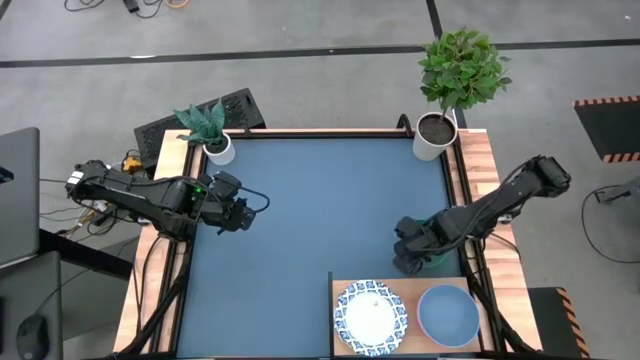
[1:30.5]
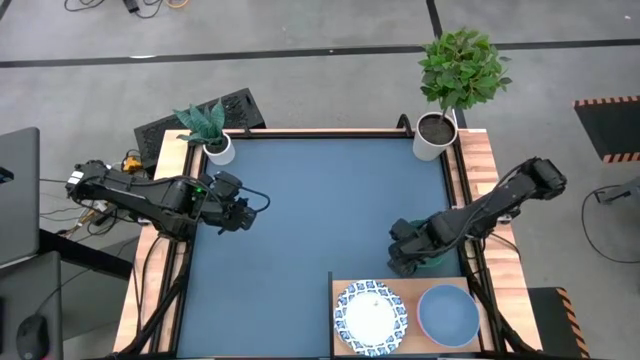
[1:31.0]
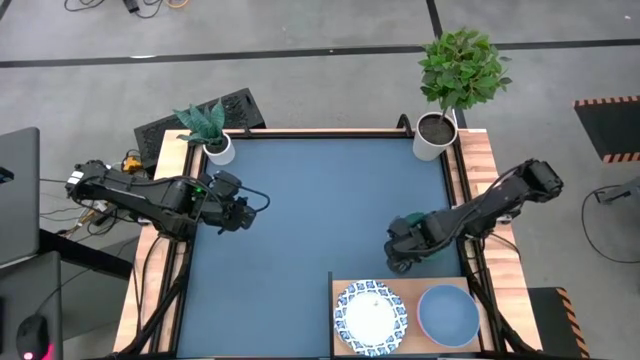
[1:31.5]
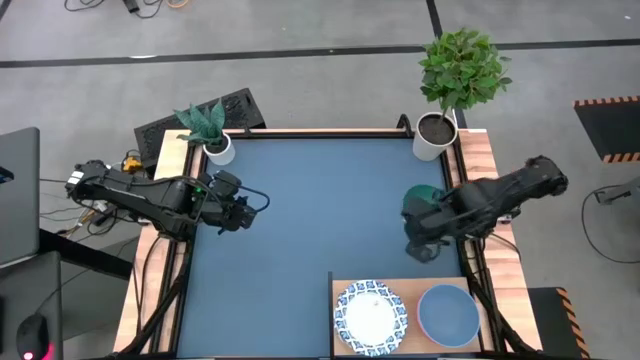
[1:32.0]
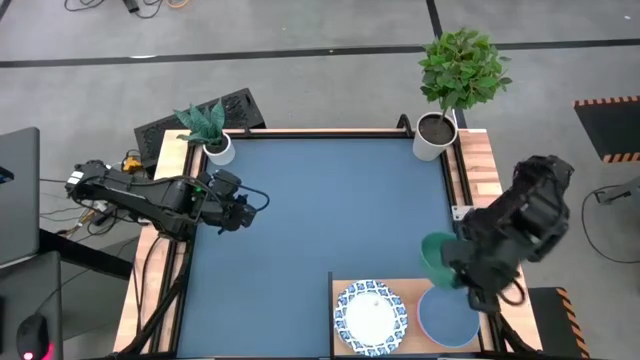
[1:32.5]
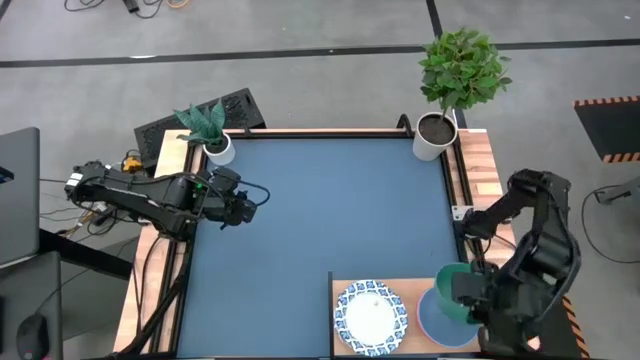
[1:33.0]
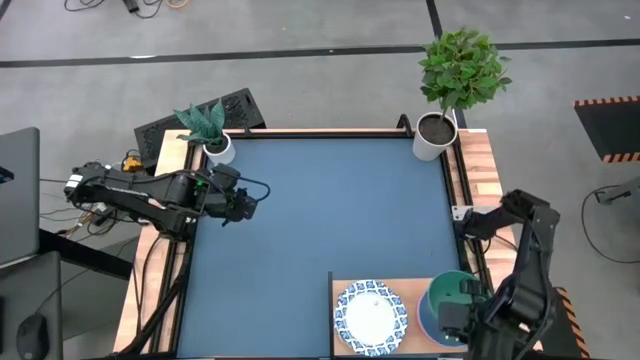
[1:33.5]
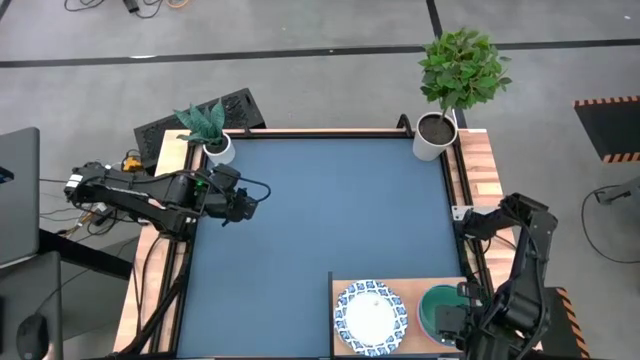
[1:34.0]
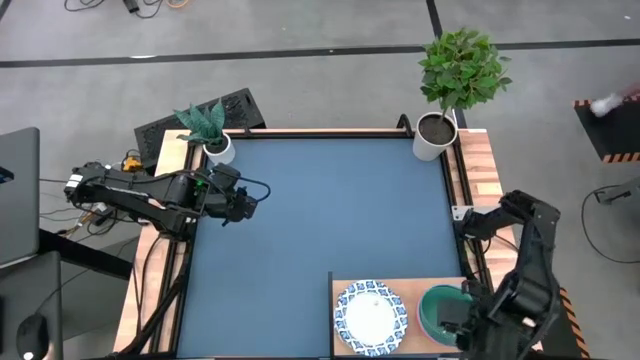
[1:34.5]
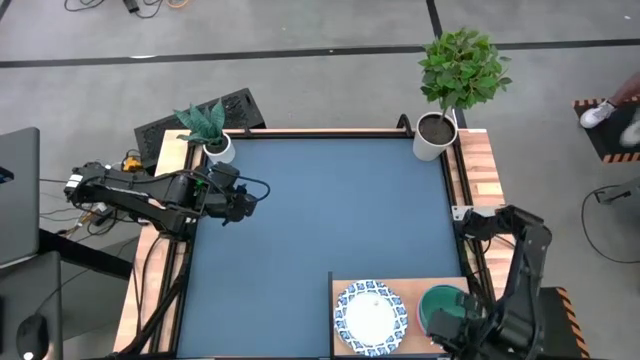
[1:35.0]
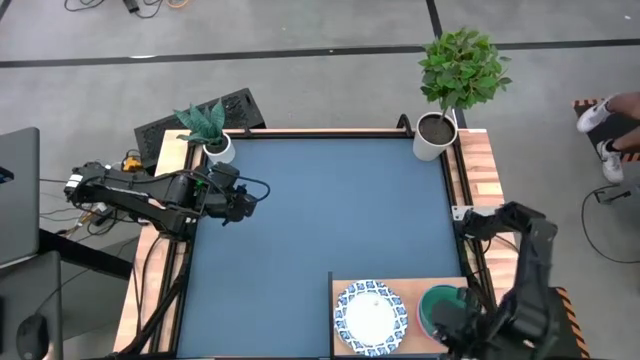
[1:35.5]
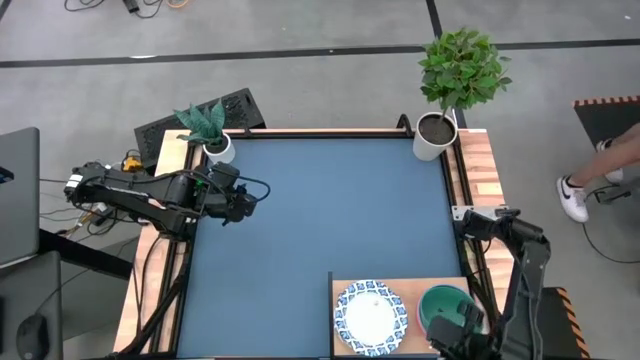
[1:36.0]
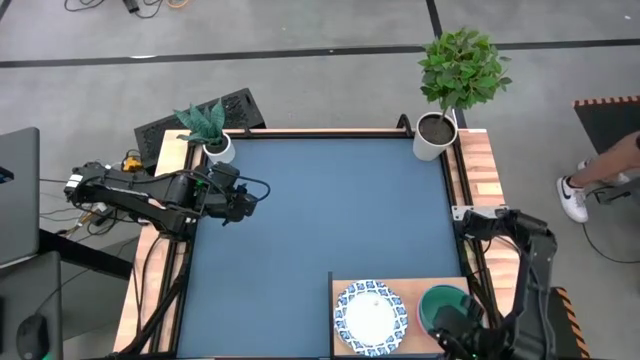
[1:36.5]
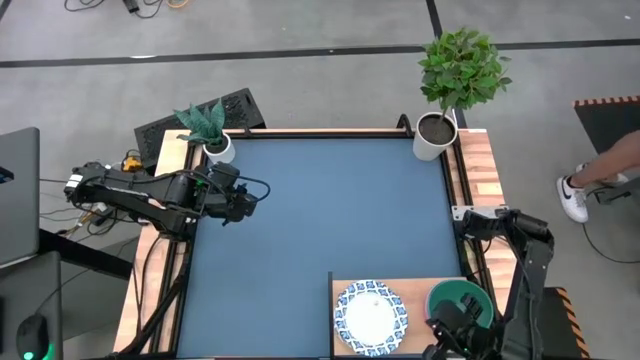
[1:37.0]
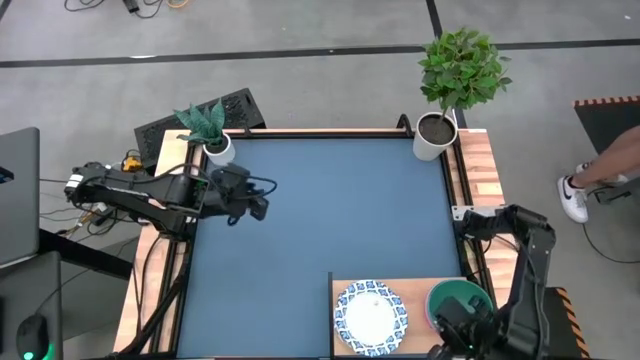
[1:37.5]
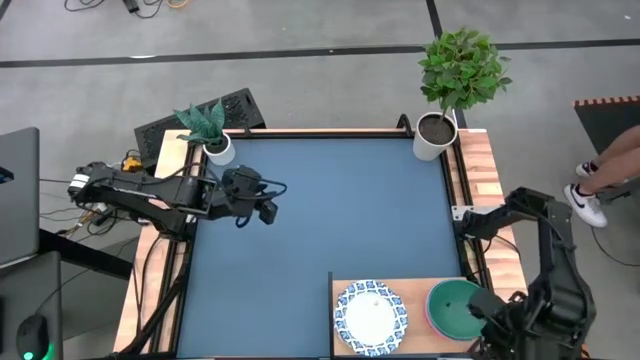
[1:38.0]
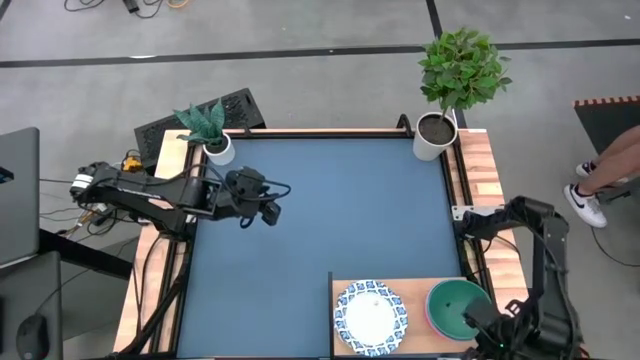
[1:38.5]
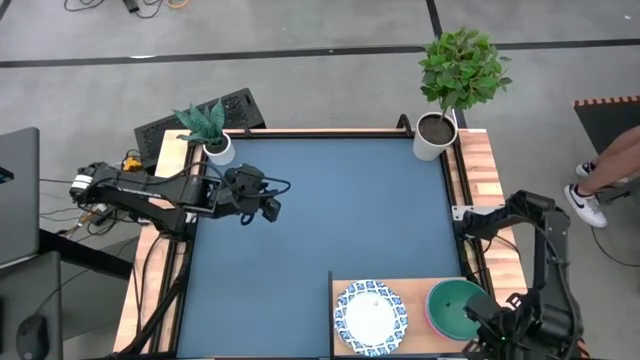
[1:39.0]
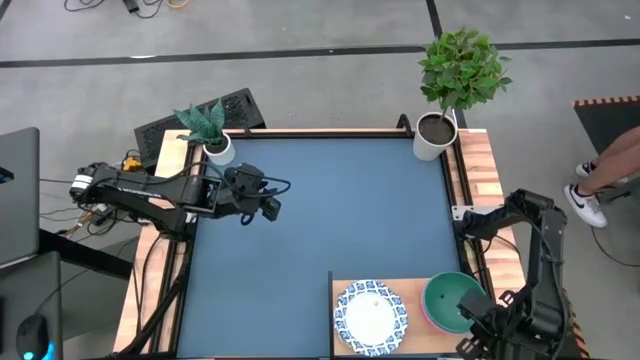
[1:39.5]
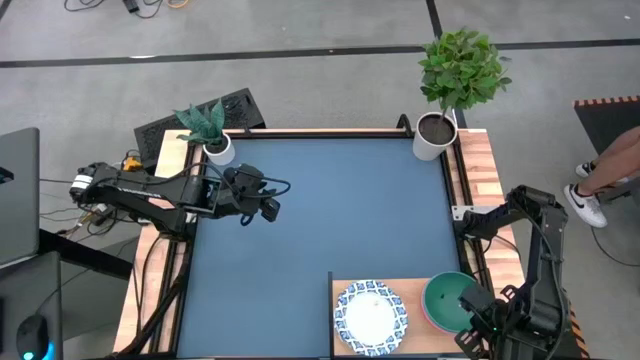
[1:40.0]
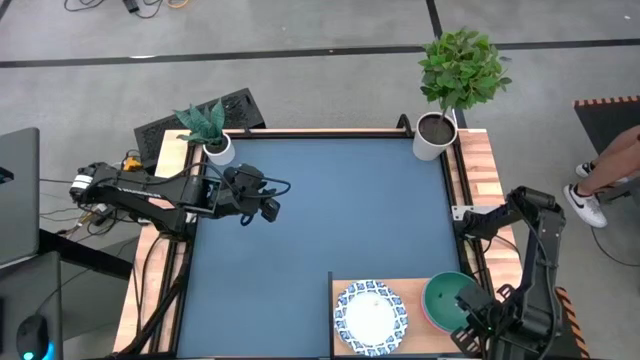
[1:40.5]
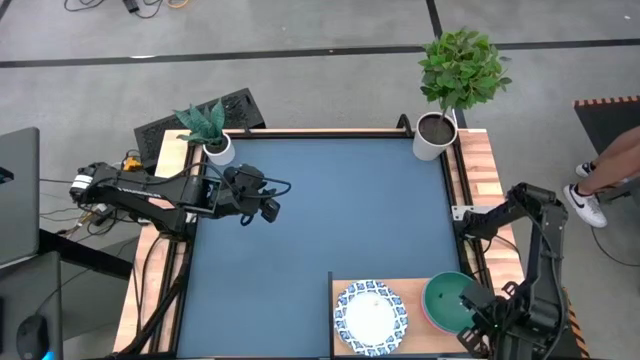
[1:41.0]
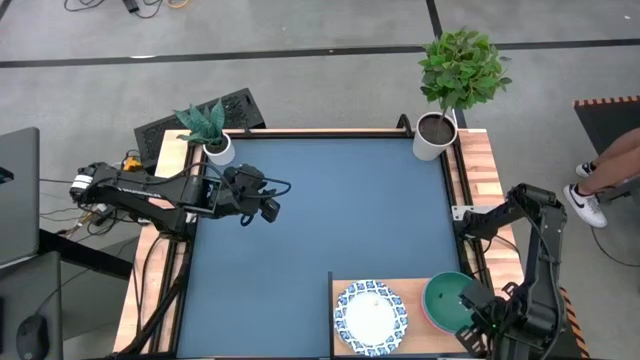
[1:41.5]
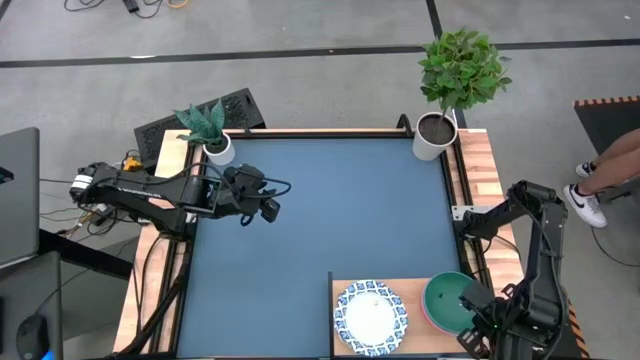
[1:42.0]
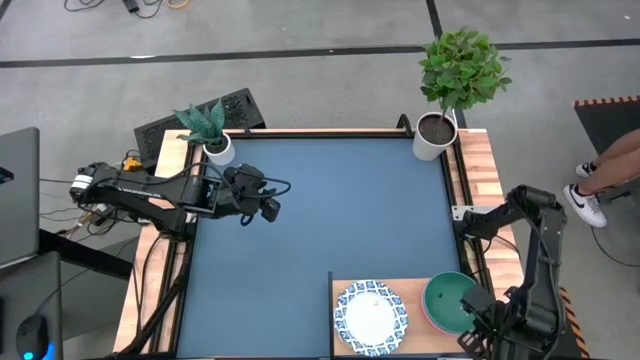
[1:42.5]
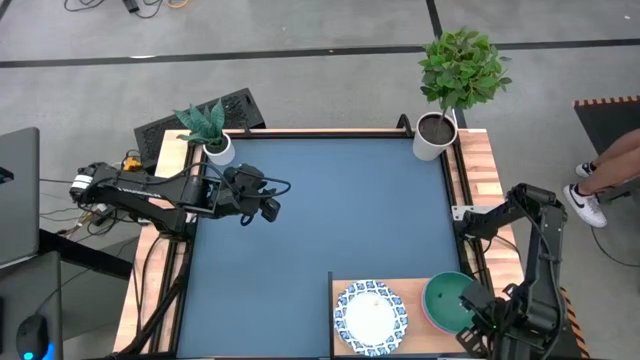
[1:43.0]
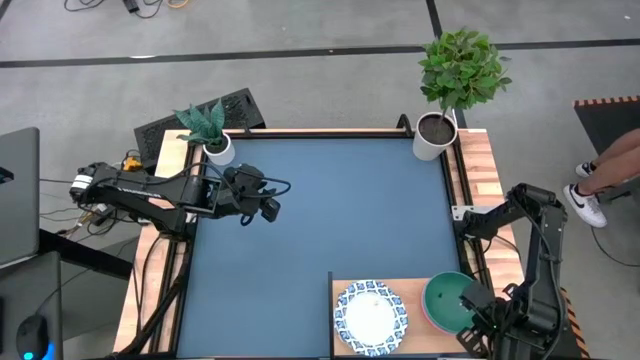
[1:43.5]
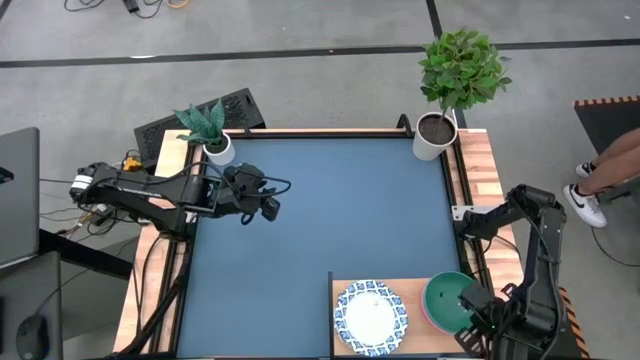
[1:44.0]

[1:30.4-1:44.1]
Task: Place and stack bowls onto a shelf
Stack the green bowl on the blue bowl on the shelf

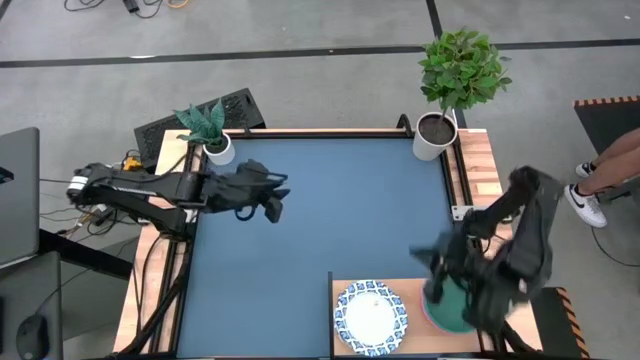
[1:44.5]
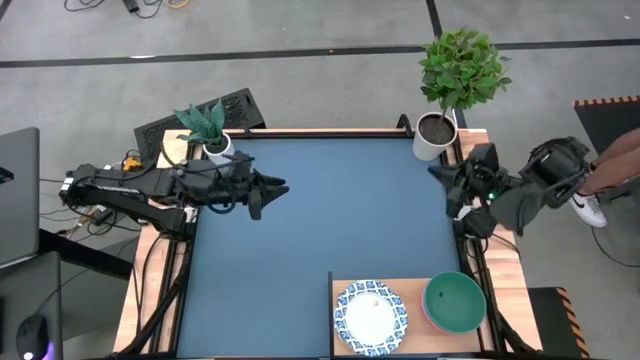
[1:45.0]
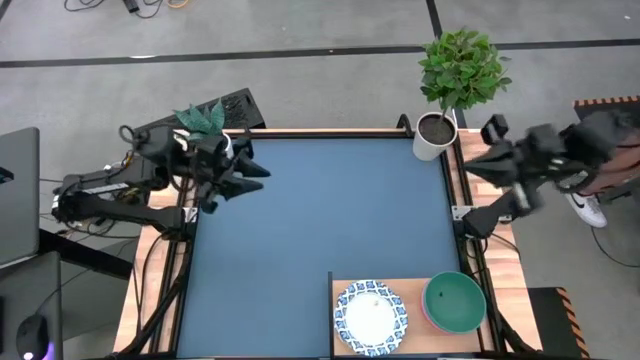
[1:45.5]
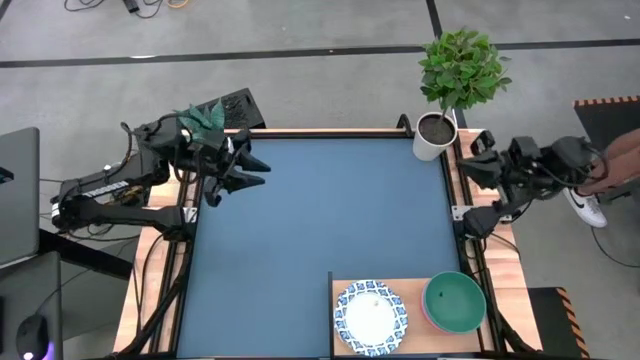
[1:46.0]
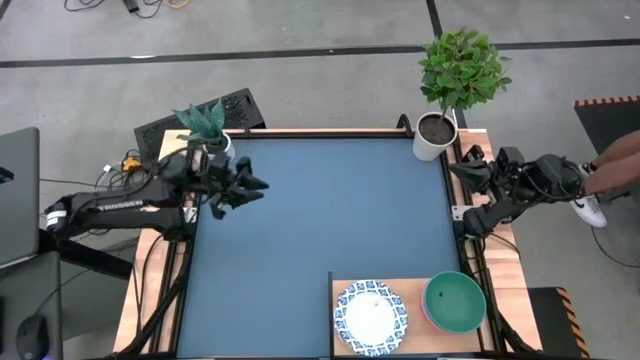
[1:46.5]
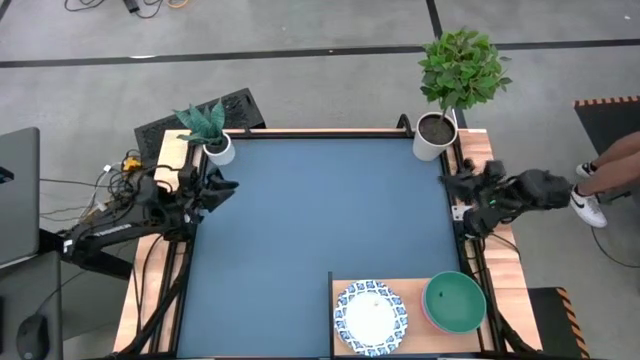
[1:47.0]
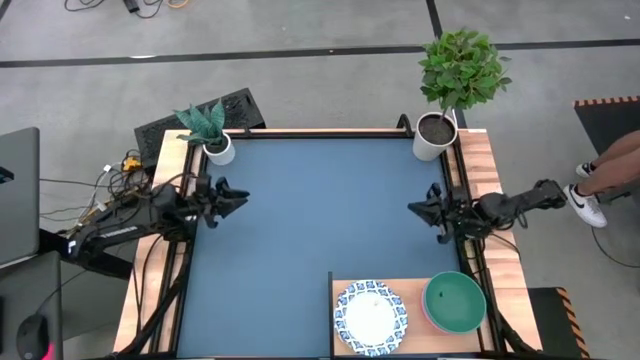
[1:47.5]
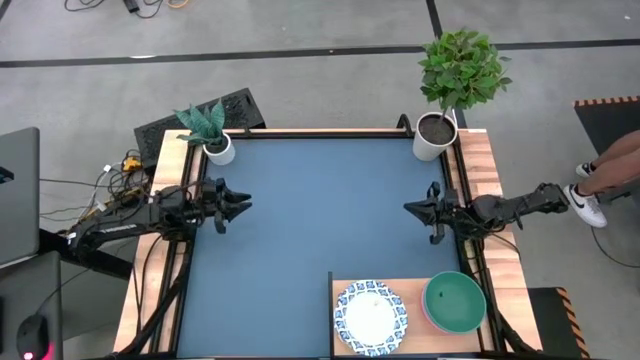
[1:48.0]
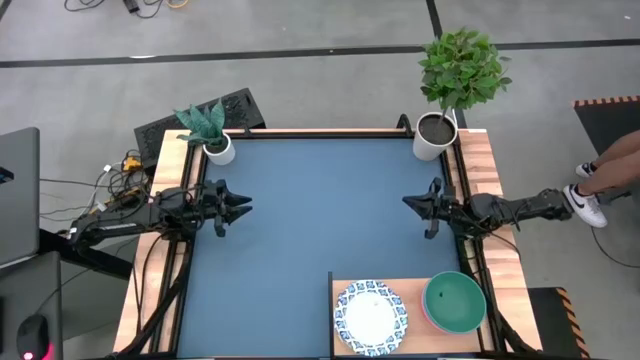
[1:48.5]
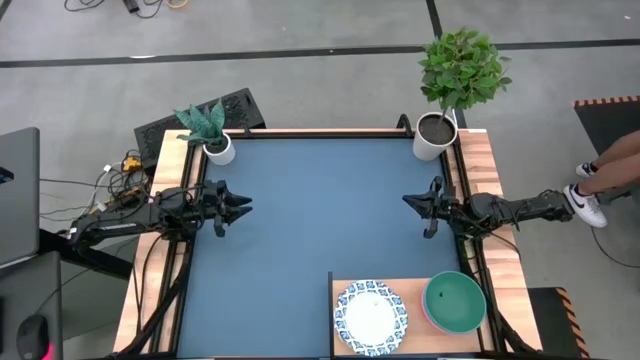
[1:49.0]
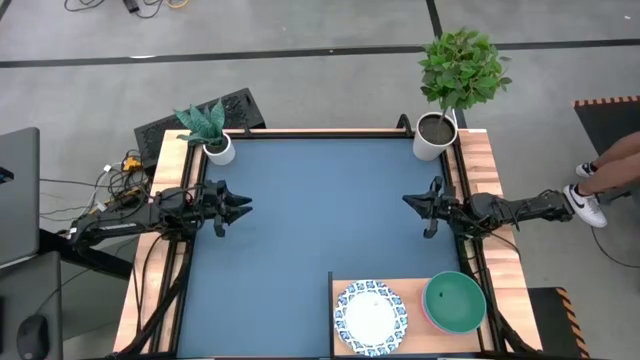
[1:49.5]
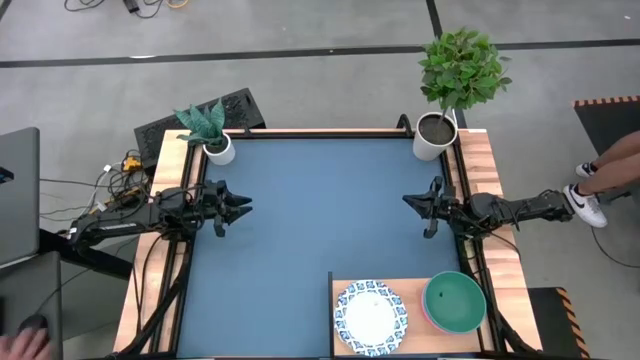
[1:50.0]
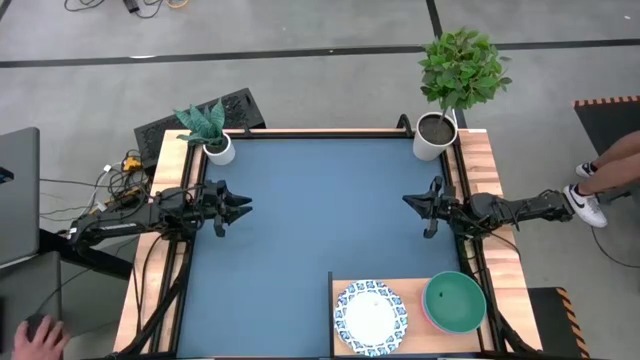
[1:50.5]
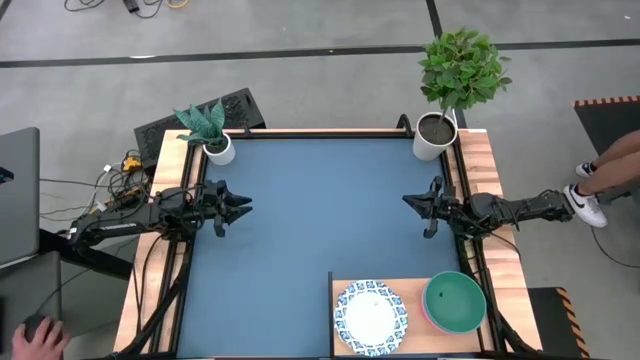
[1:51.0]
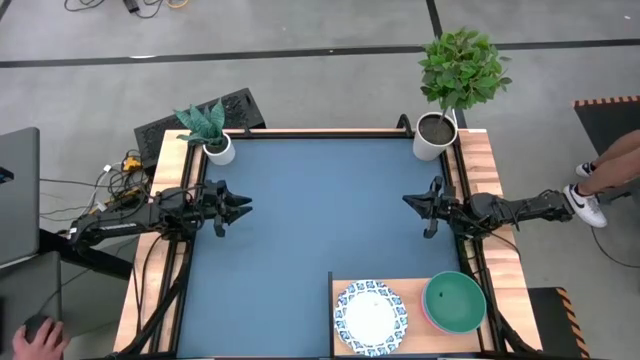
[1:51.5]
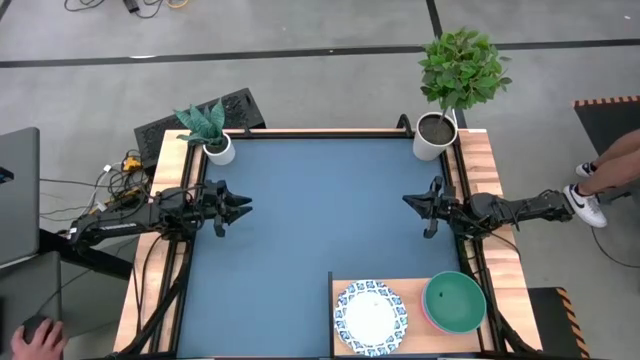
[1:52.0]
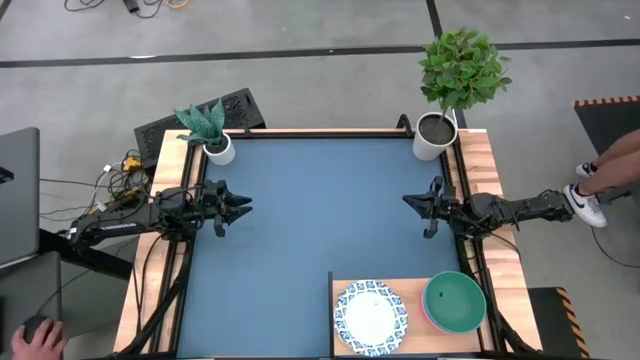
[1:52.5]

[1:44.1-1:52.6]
Return to Home Position
